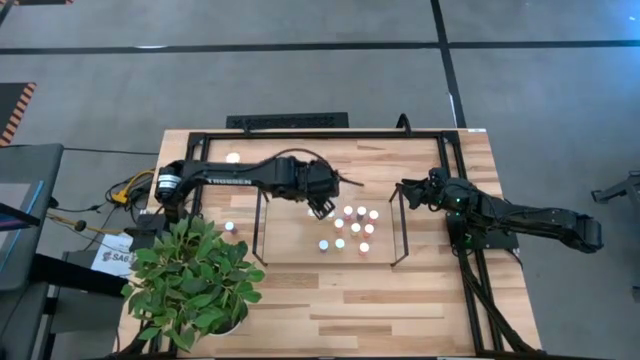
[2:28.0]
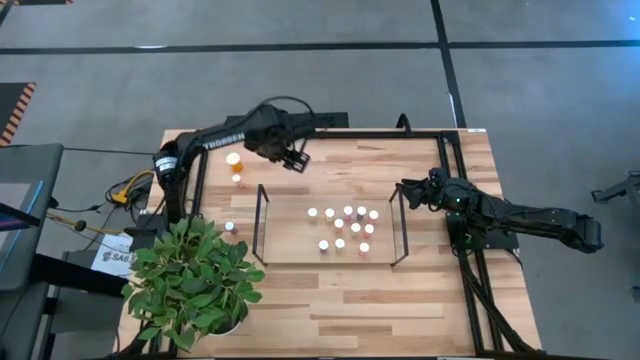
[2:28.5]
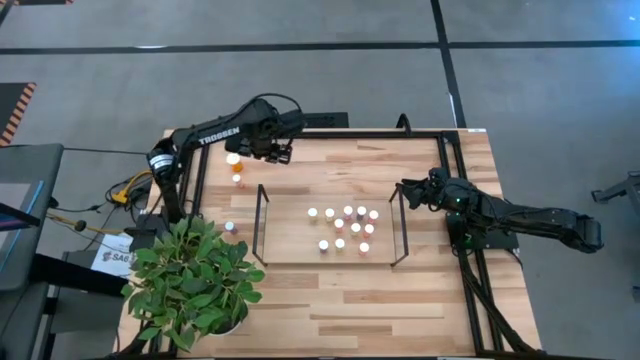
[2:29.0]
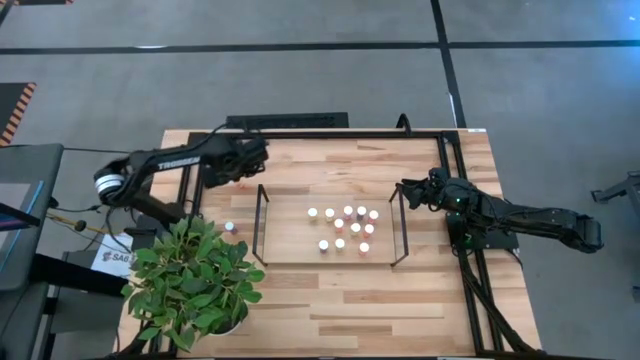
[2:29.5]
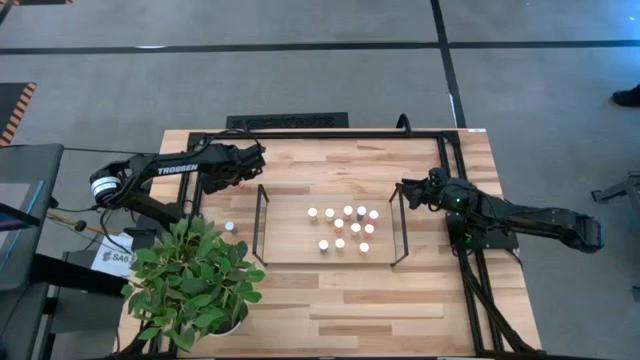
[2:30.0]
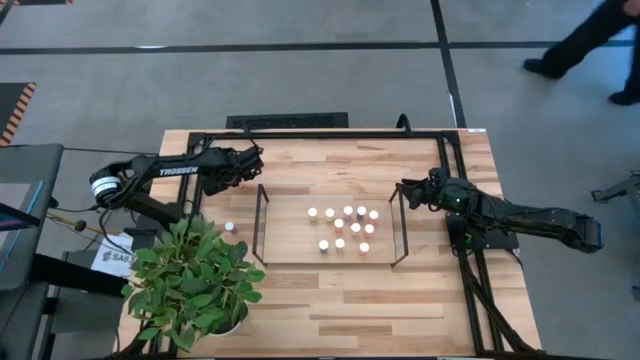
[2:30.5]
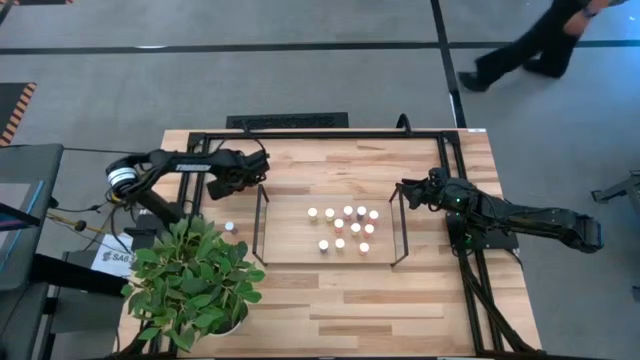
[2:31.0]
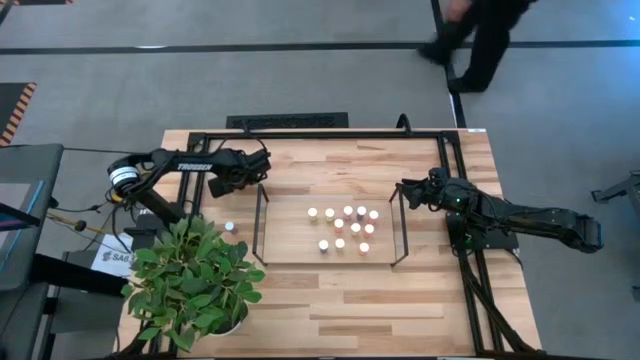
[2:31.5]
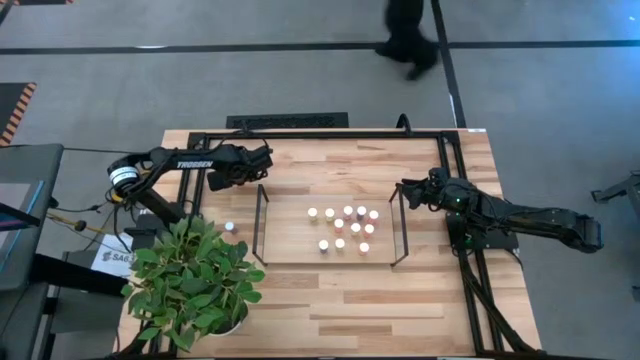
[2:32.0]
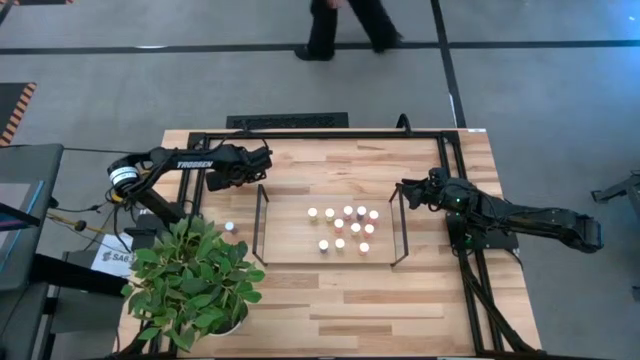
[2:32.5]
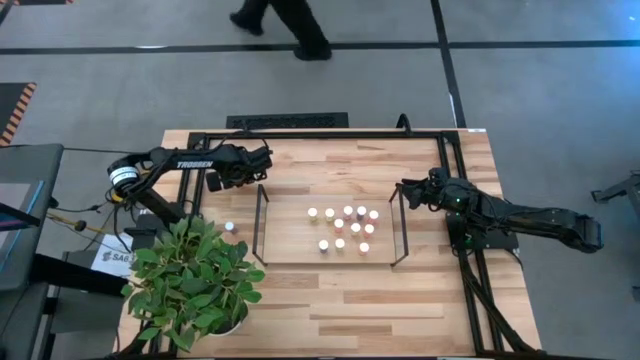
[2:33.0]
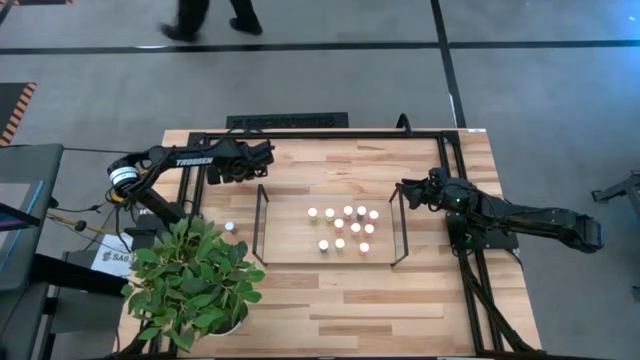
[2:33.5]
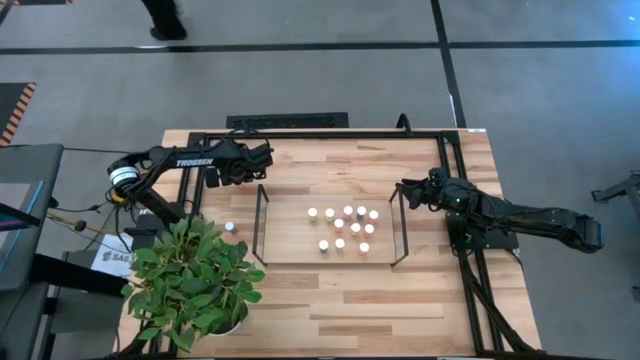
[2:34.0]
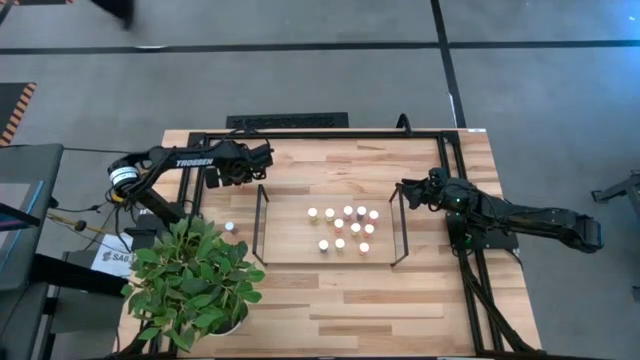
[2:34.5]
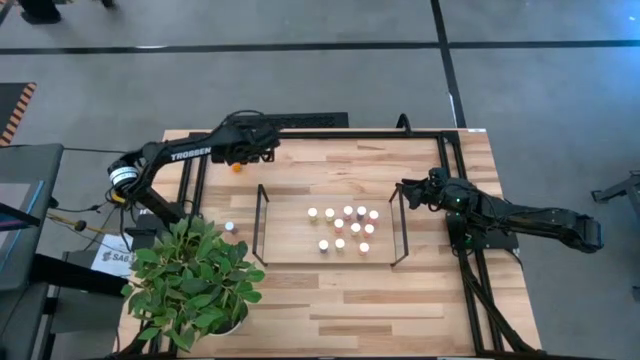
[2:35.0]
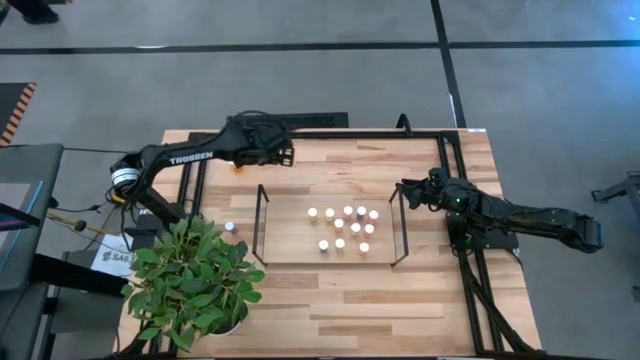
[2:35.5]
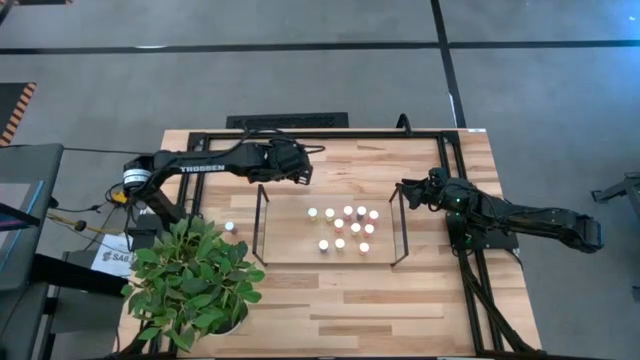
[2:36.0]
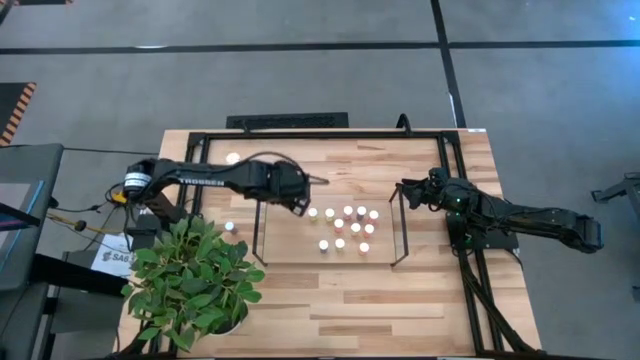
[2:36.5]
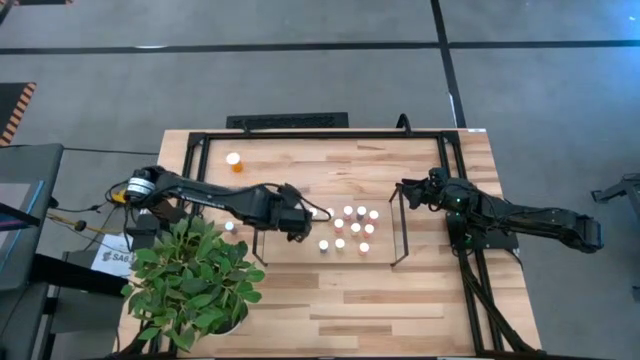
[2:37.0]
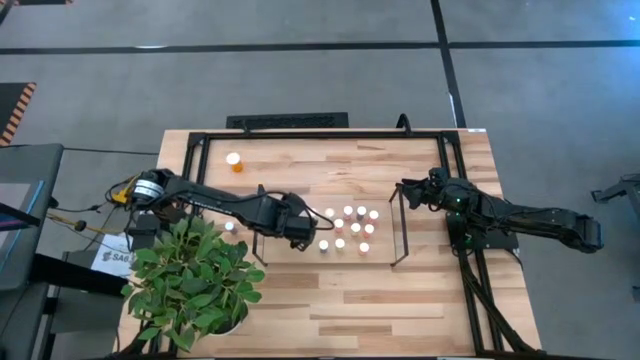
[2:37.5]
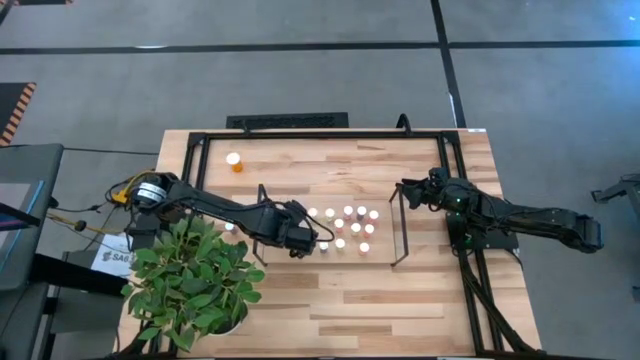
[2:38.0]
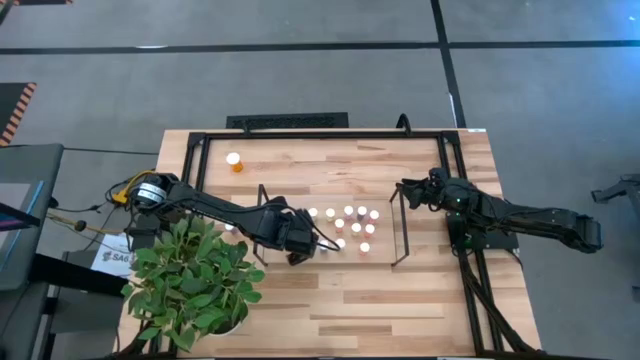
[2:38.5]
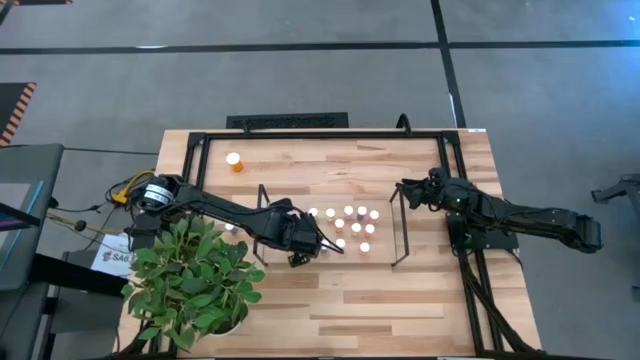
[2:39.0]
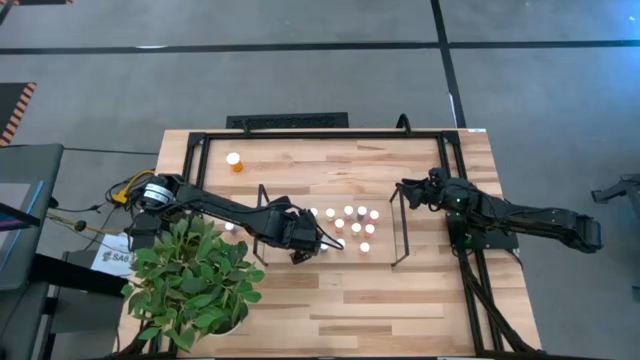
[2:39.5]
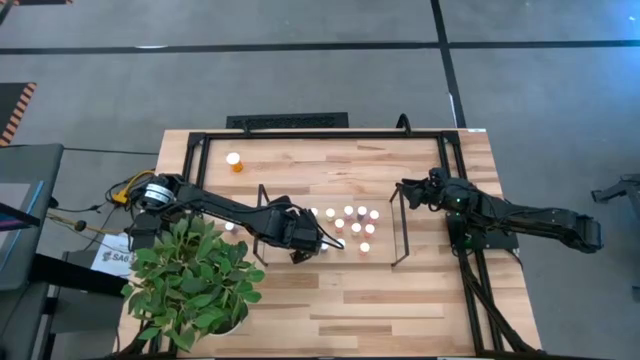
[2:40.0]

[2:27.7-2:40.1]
Task: Pick and place medicine bottles onto shelf by color
Put the red pill bottle on the shelf

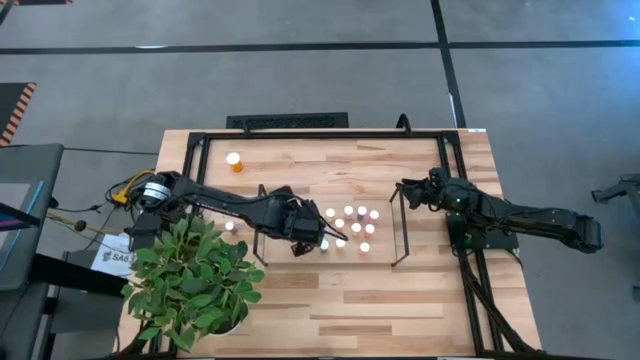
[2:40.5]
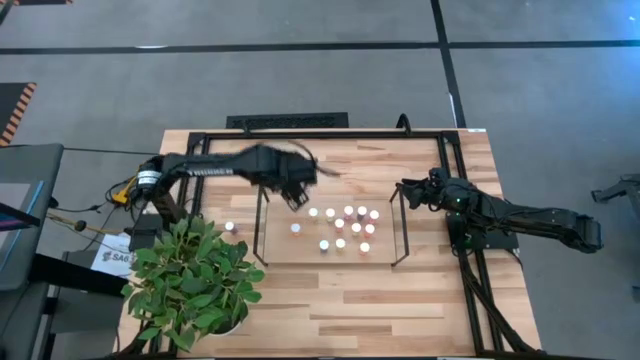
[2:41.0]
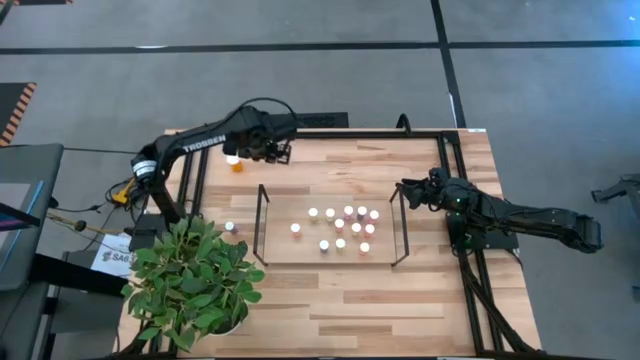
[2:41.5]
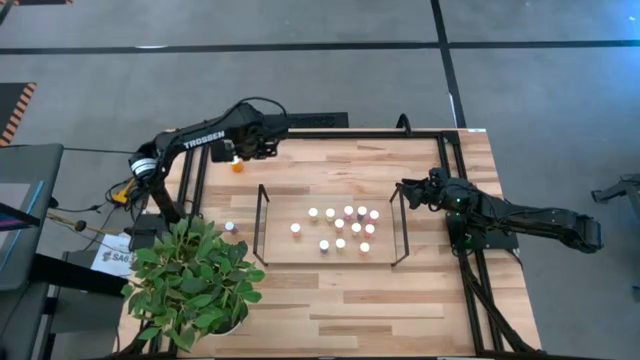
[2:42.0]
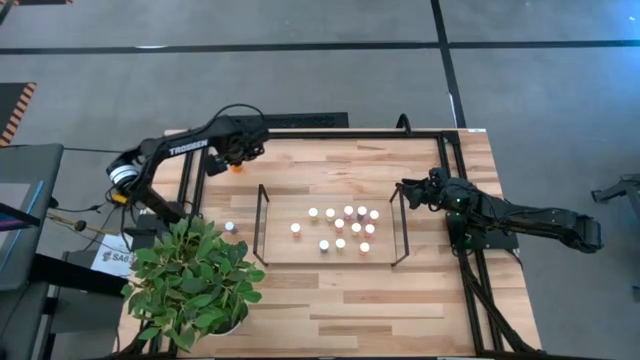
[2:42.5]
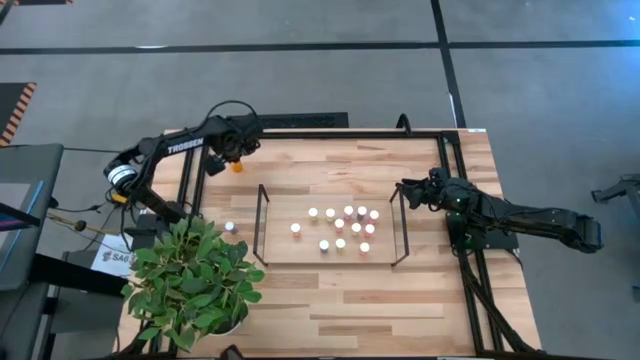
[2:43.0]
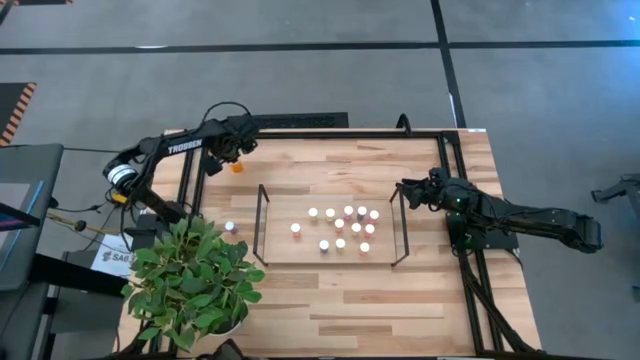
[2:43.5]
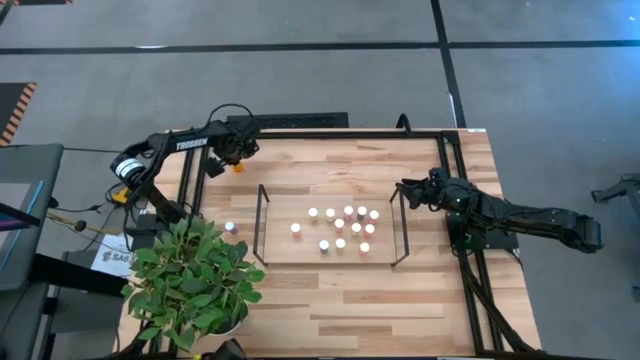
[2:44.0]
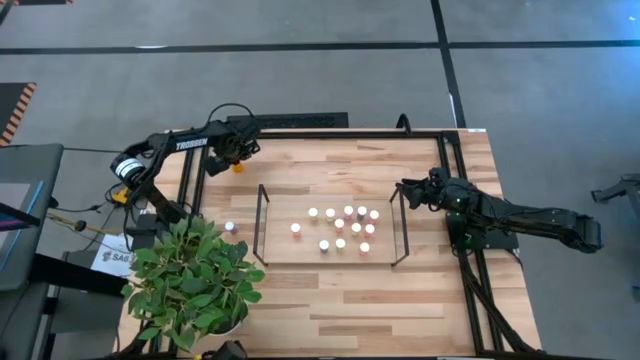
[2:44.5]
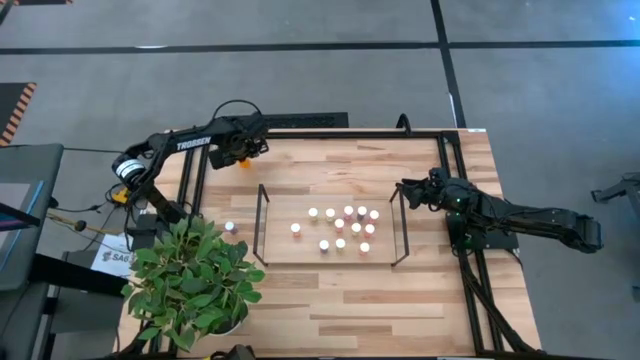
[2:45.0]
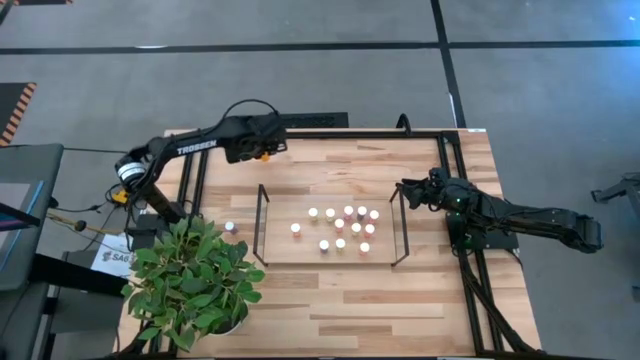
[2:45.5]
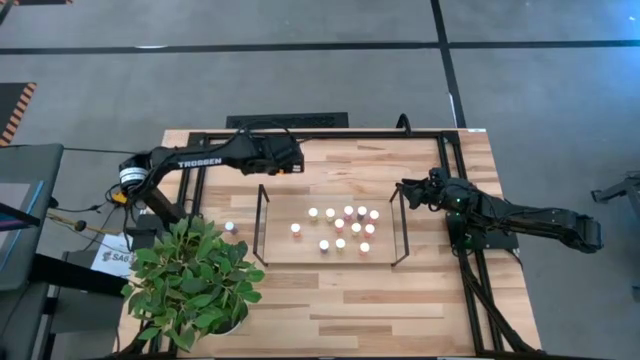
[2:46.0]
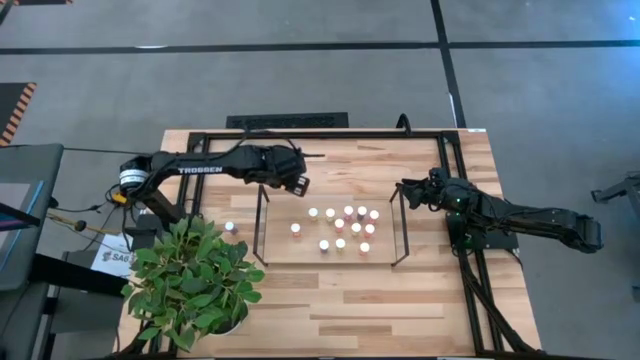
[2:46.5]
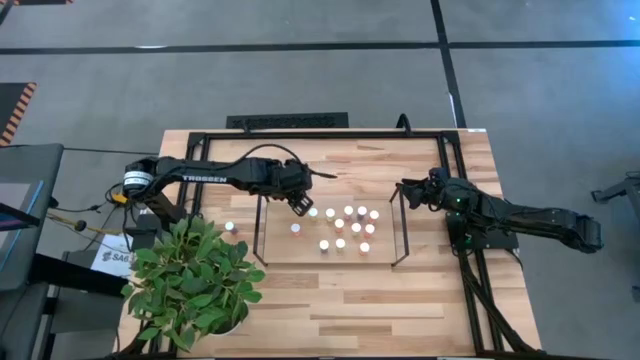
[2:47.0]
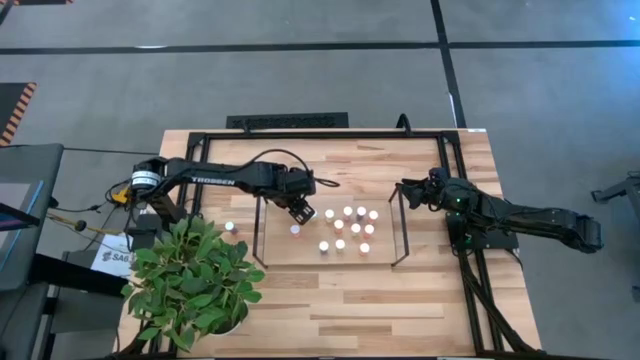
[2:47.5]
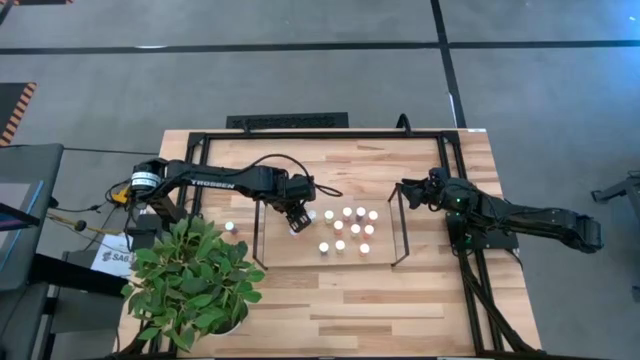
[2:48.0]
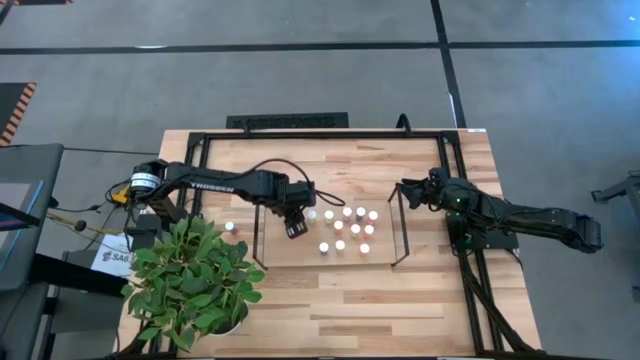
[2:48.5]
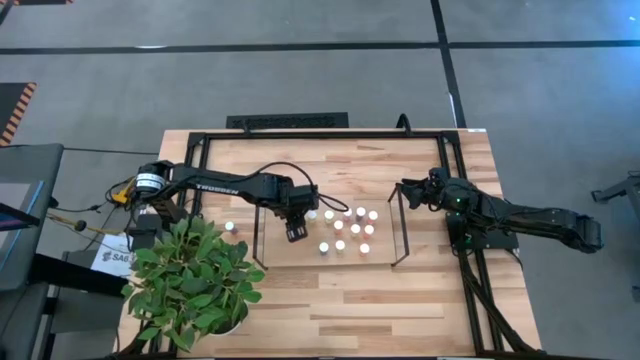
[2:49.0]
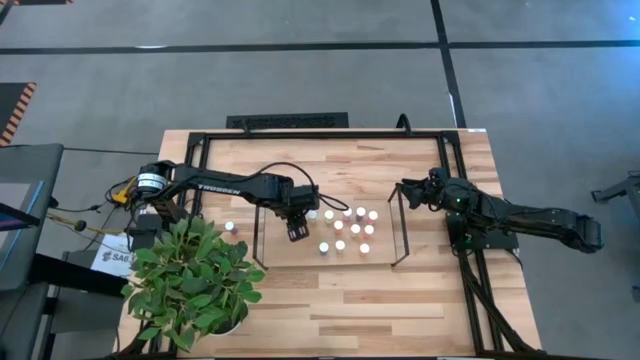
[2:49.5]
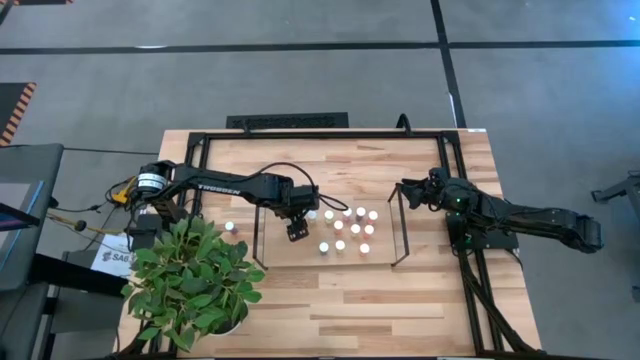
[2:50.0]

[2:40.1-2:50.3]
Put the orange pill bottle on the shelf
